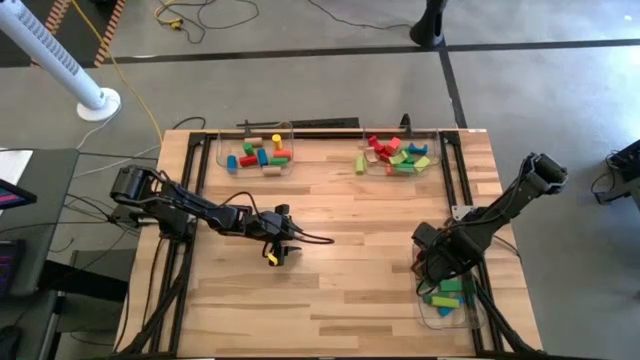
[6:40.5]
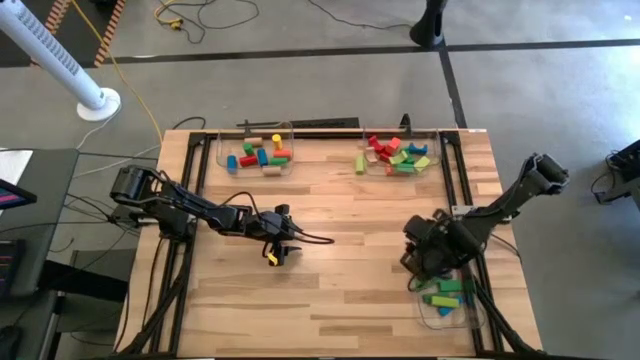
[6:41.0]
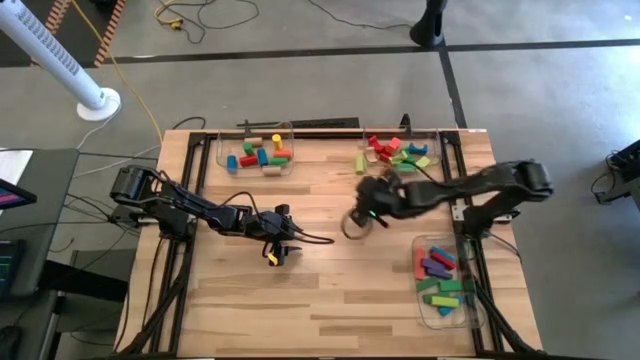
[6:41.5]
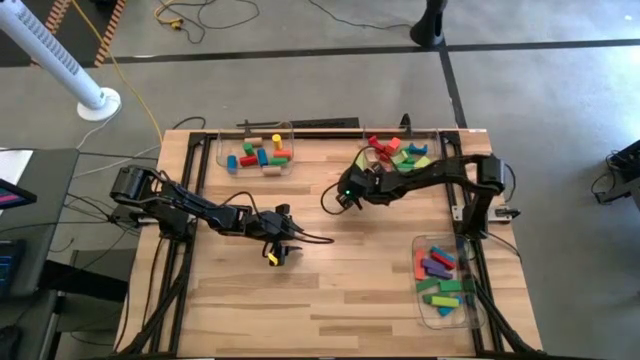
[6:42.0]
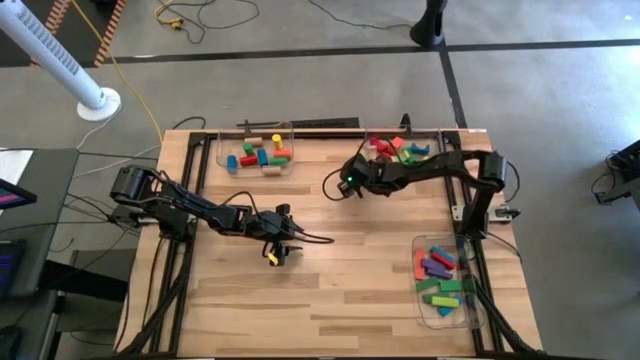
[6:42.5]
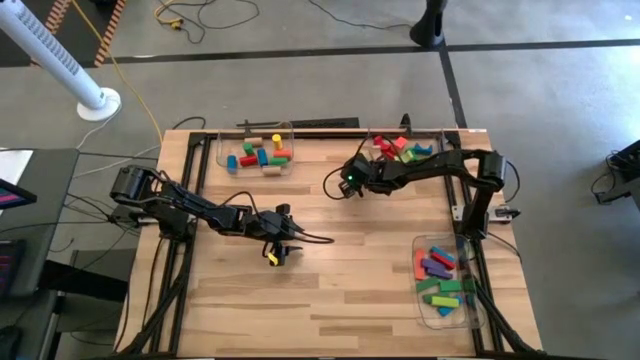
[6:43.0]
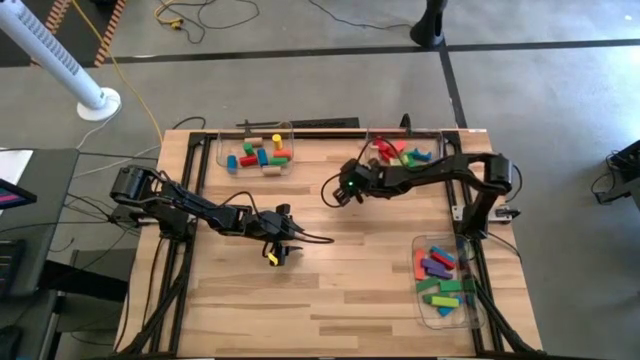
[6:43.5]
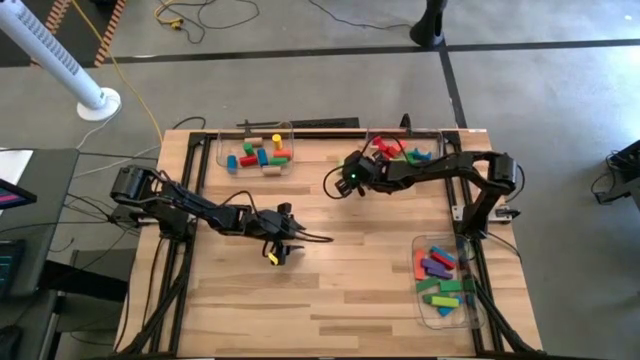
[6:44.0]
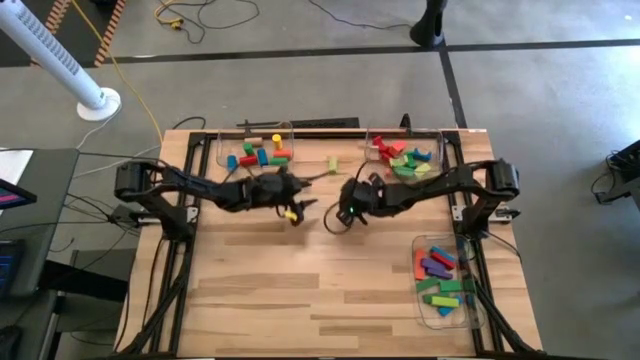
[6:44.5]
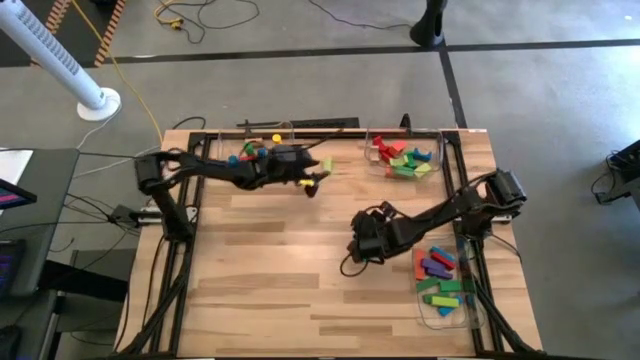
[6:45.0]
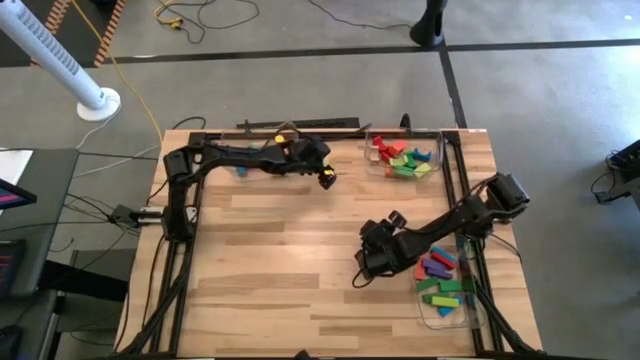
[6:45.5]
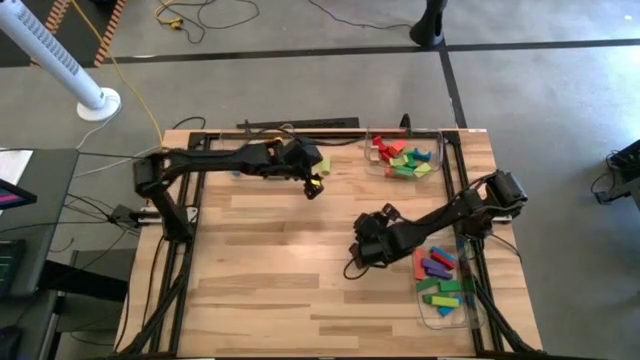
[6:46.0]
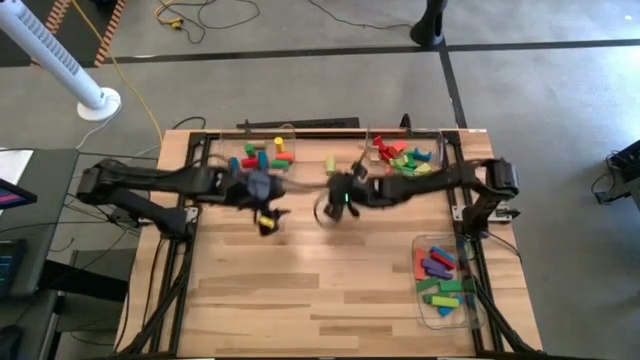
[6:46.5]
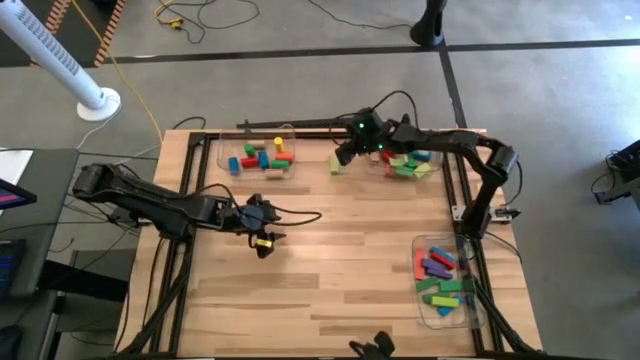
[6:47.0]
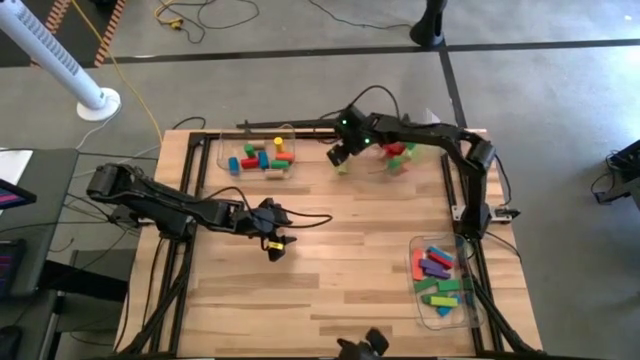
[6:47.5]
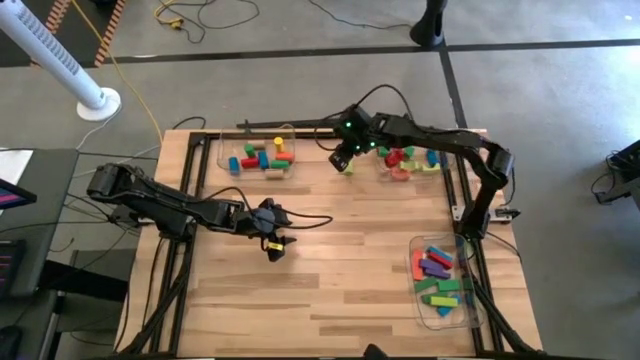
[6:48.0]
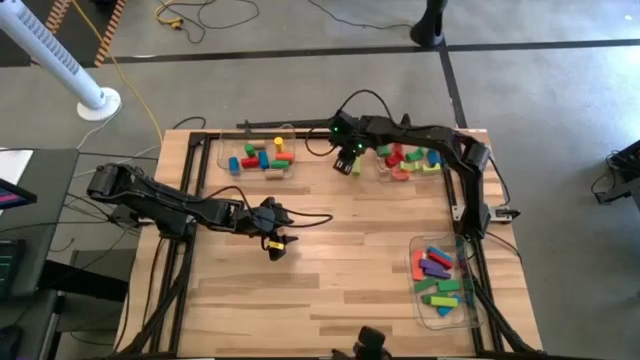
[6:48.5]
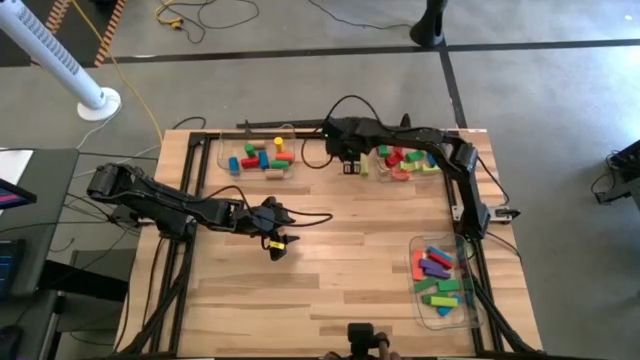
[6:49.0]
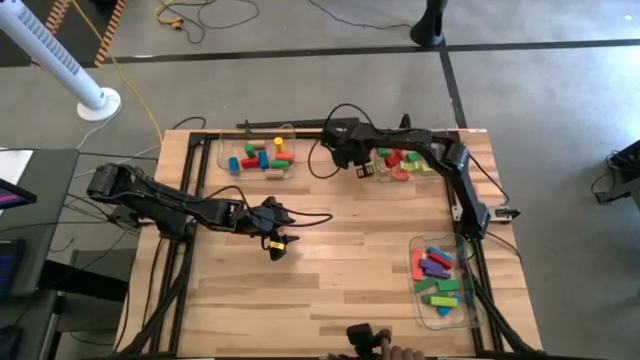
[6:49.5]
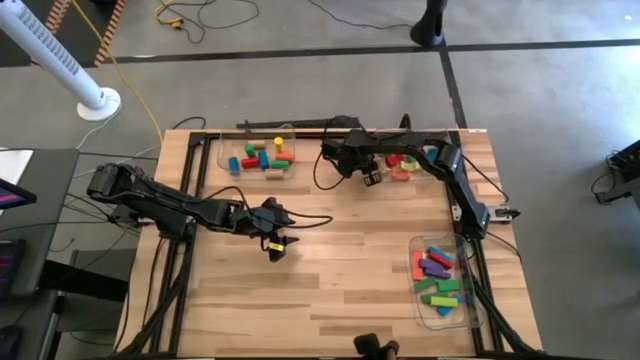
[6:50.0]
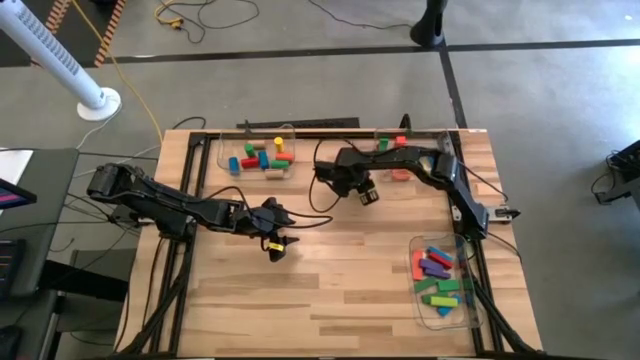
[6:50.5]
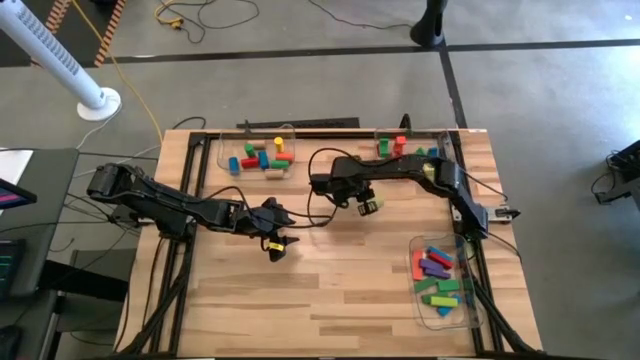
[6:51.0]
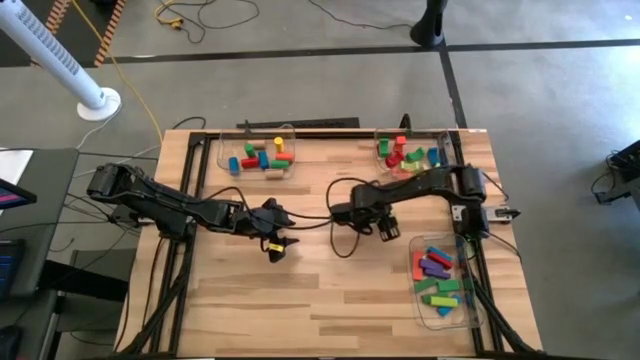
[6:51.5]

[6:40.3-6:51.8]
Task: Sort blocks by size
Put the light green cylindrical block into the top left transparent bin

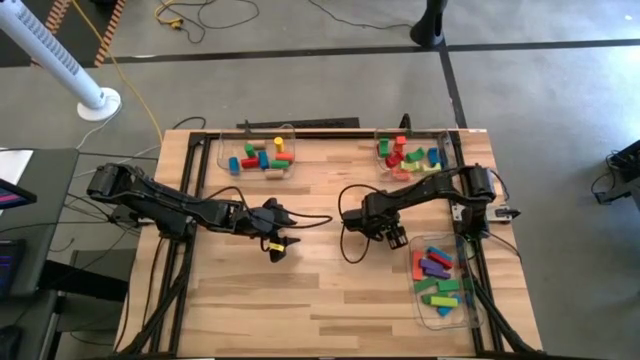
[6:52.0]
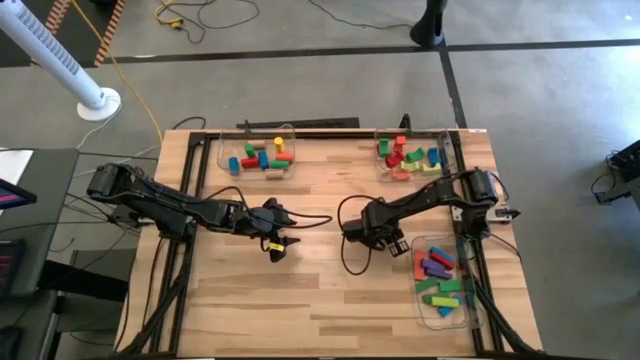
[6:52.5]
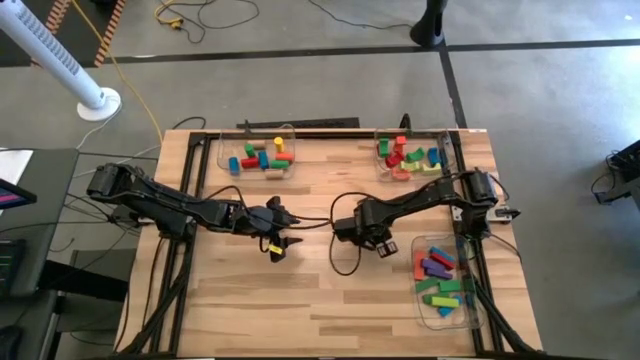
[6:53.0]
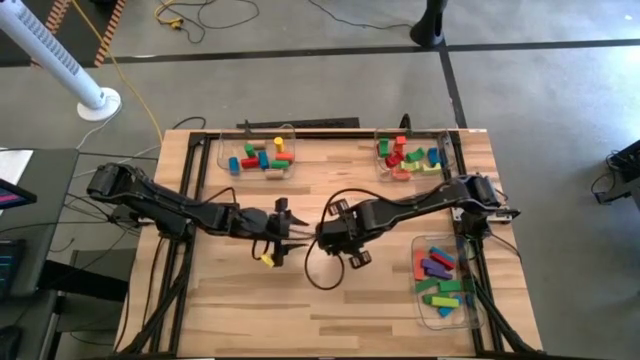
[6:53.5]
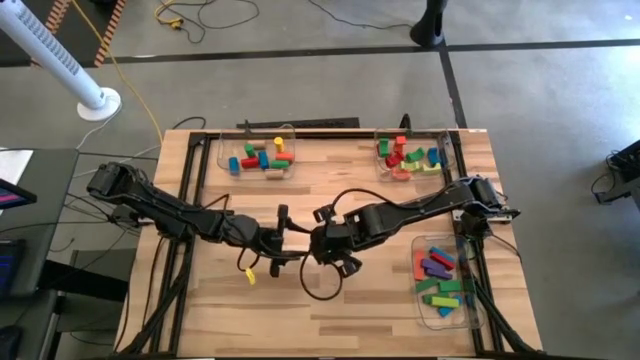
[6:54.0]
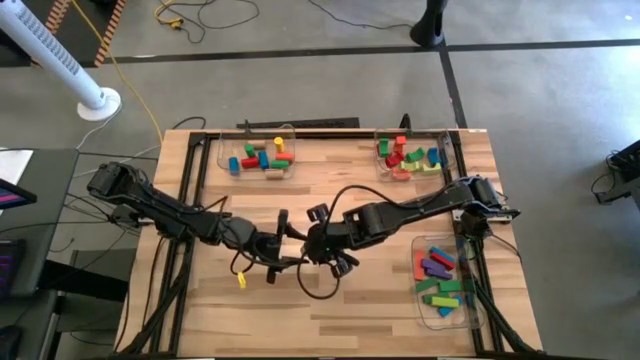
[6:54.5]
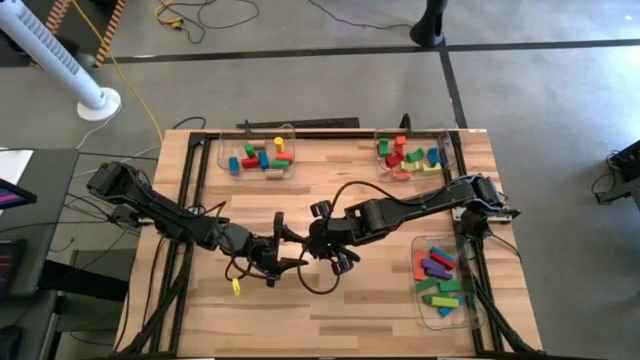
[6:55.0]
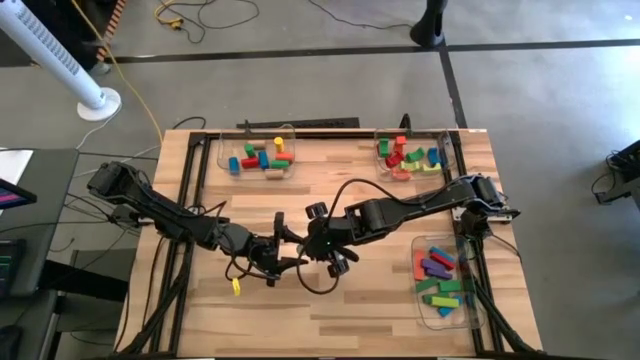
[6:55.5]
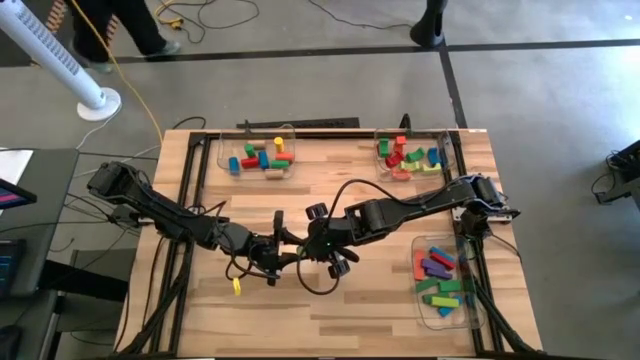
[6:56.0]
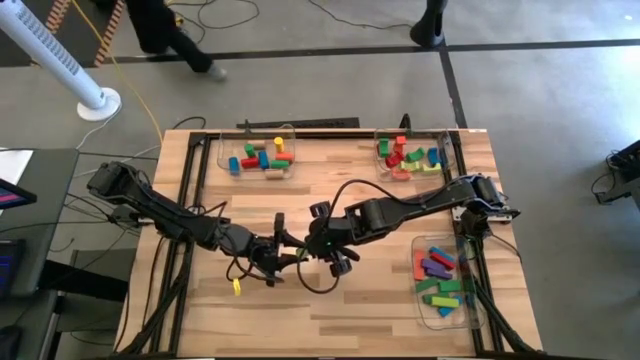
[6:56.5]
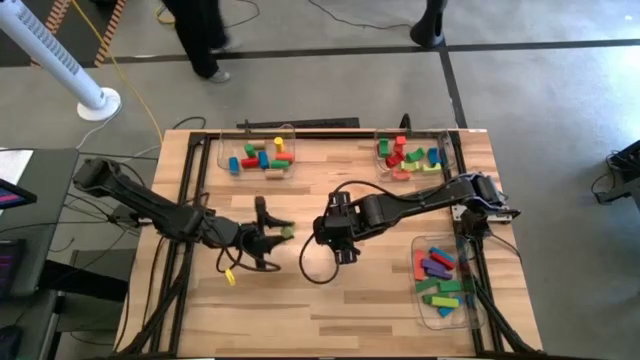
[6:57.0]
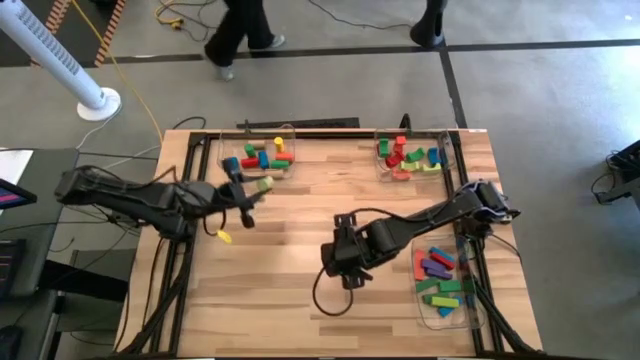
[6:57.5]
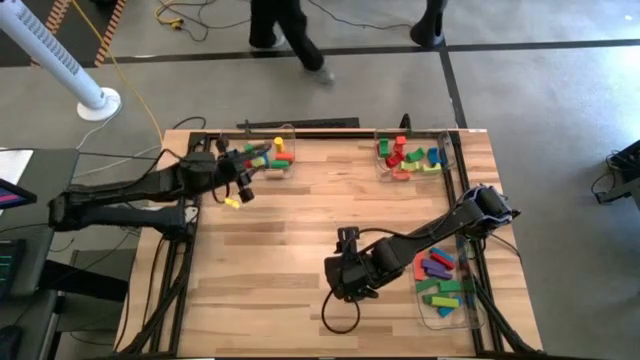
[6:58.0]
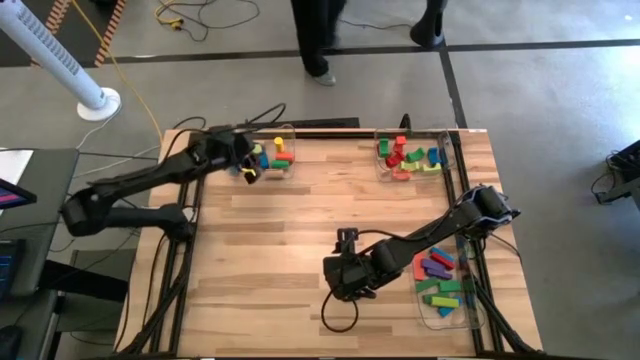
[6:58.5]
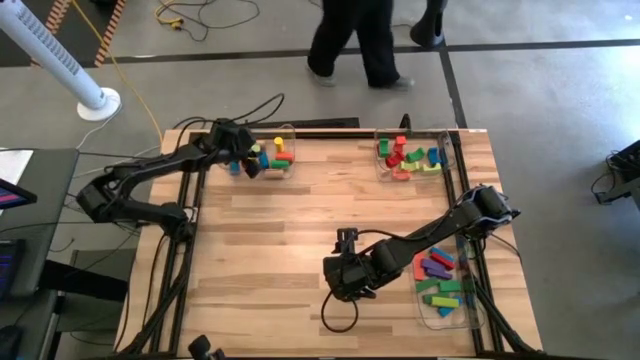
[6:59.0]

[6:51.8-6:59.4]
Put the light green cylindrical block into the top left transparent bin

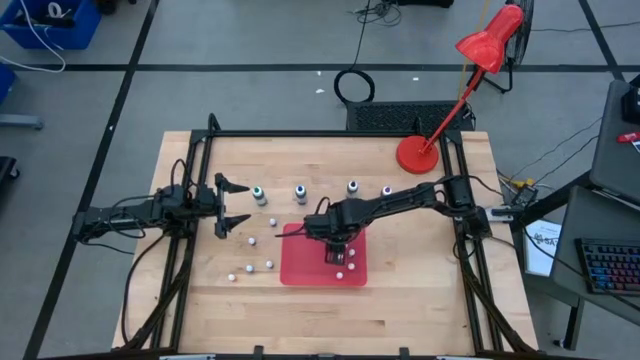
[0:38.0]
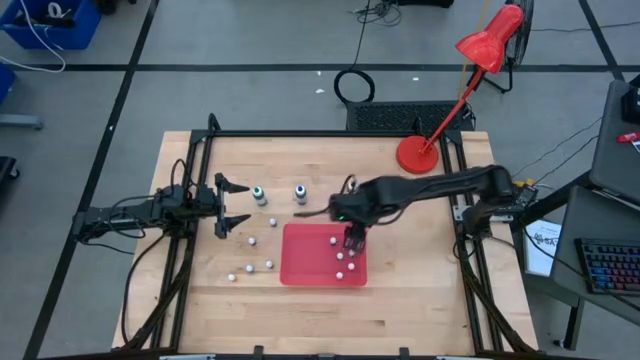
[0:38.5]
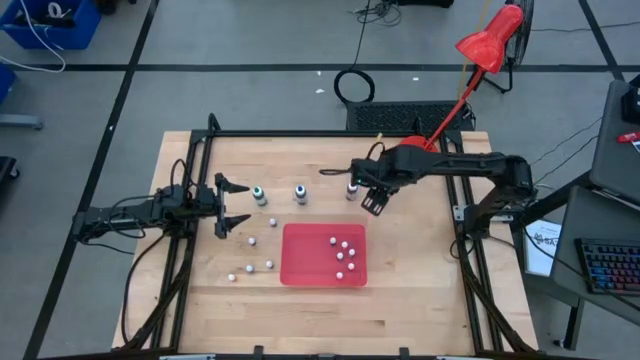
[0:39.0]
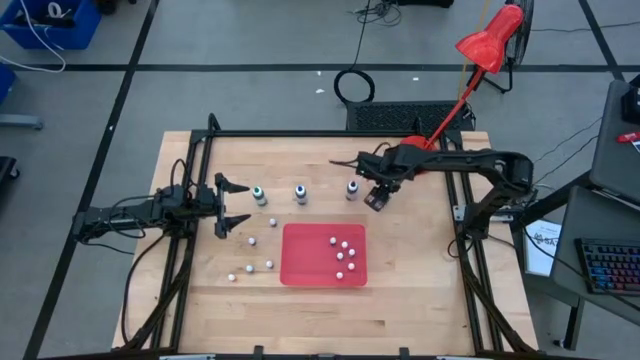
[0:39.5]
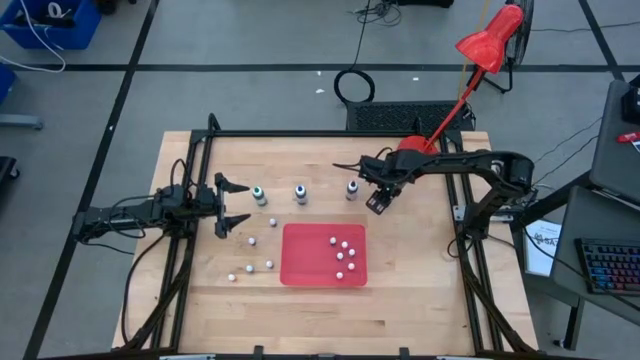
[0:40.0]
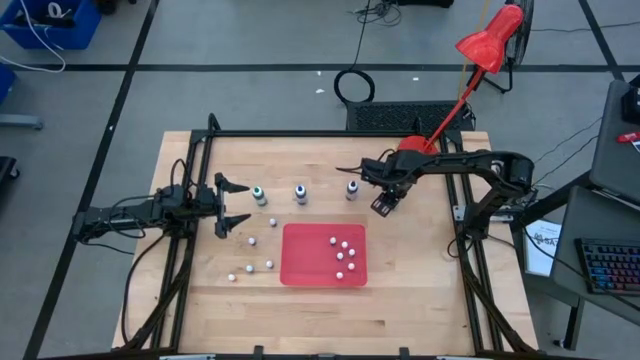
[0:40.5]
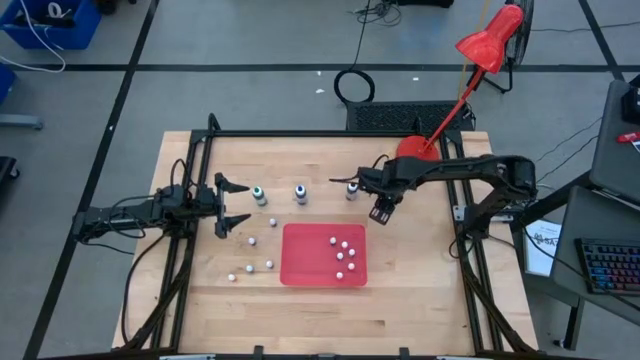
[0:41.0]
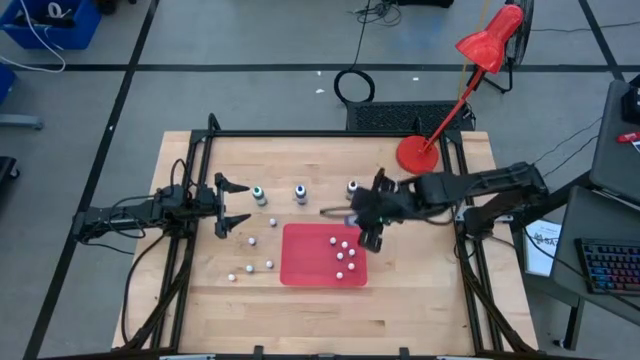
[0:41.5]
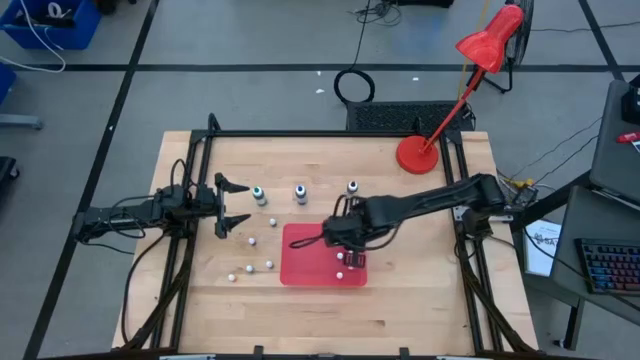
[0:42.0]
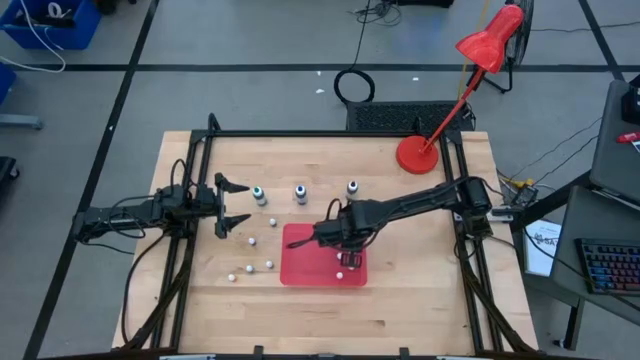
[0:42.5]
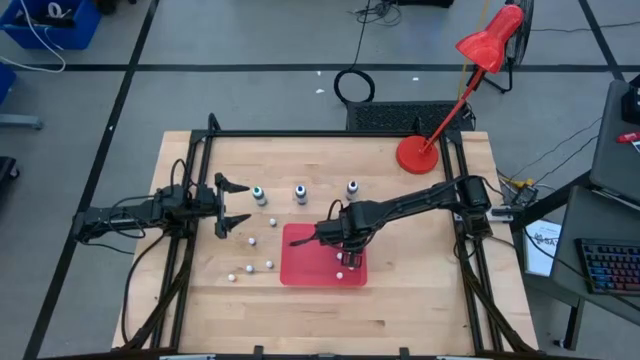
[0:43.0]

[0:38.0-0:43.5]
Task: Pick & Place food coloring
Put the large purple food coloring bottle into the pink bin
